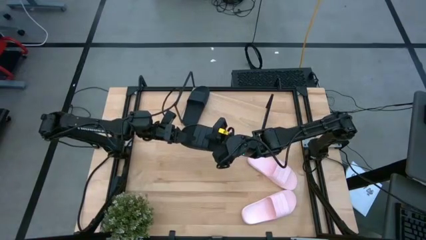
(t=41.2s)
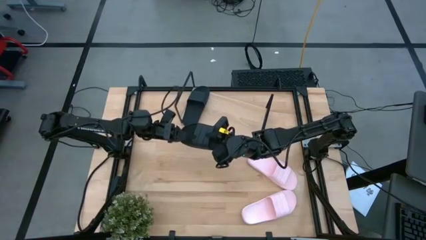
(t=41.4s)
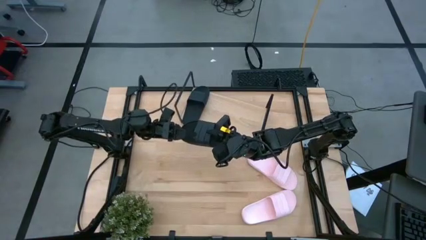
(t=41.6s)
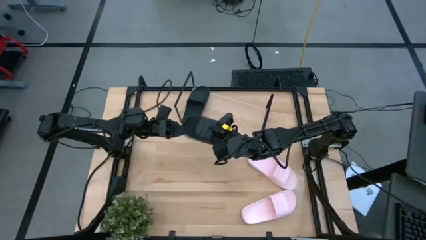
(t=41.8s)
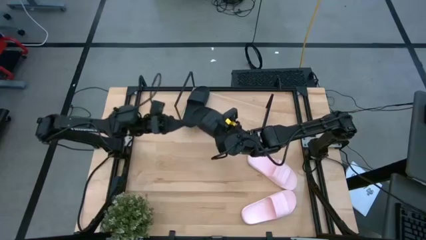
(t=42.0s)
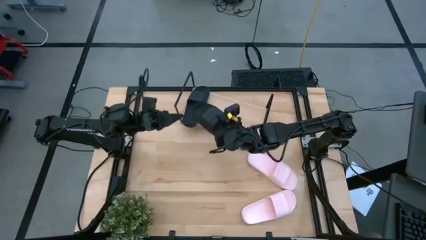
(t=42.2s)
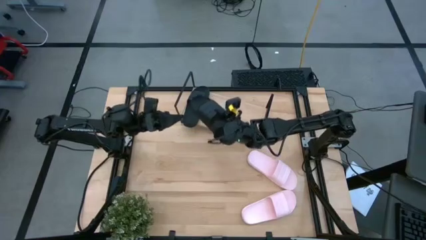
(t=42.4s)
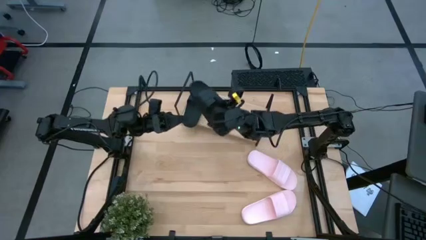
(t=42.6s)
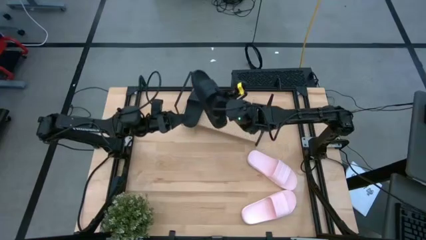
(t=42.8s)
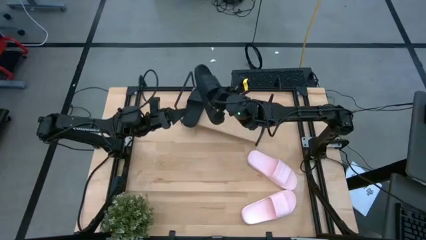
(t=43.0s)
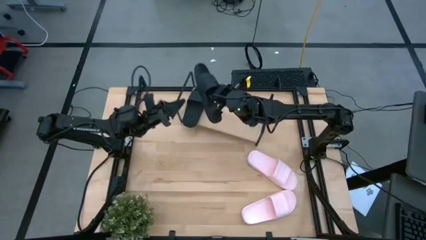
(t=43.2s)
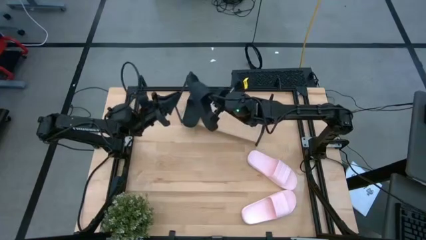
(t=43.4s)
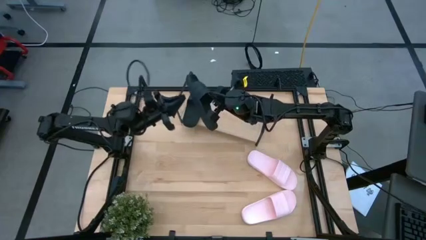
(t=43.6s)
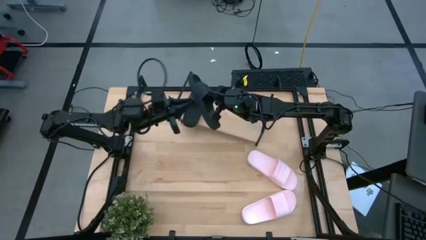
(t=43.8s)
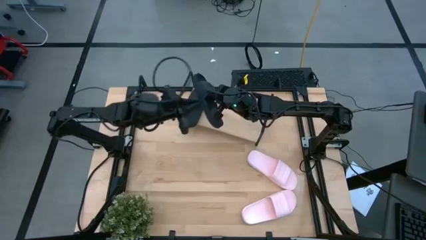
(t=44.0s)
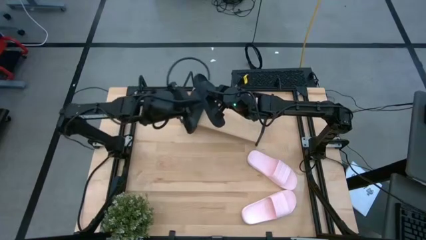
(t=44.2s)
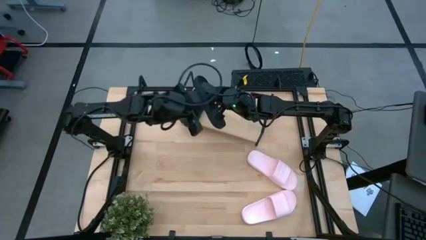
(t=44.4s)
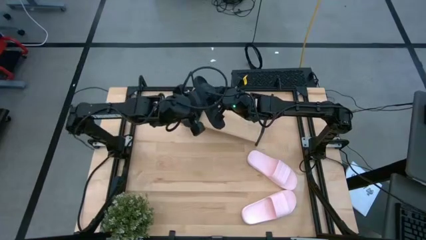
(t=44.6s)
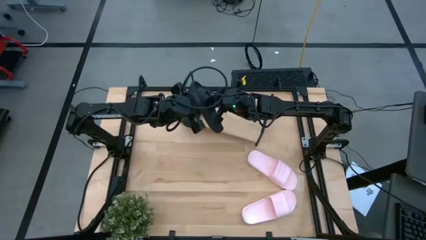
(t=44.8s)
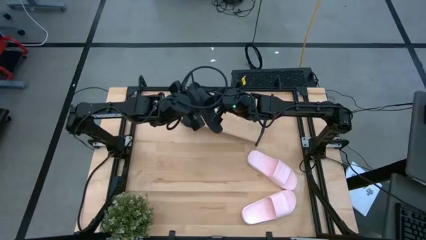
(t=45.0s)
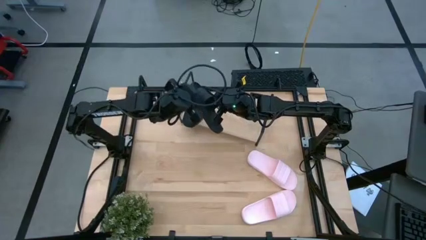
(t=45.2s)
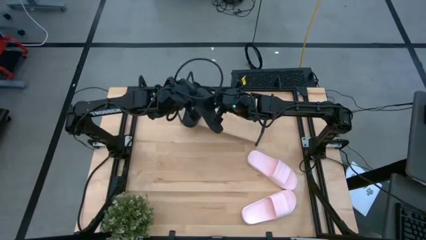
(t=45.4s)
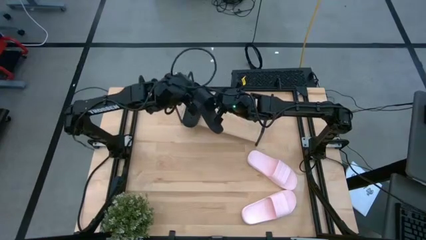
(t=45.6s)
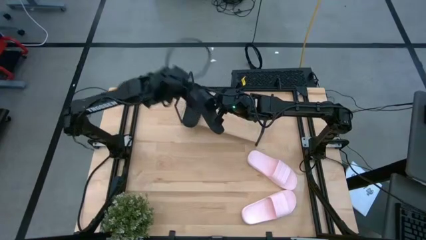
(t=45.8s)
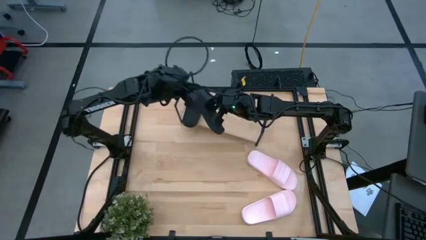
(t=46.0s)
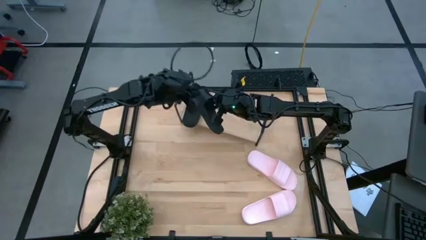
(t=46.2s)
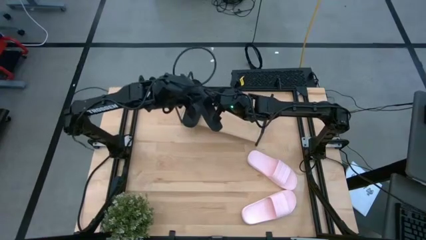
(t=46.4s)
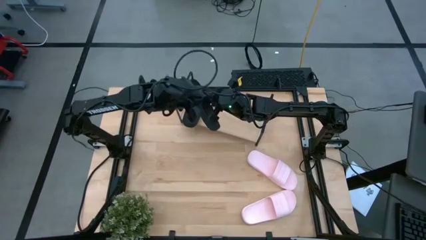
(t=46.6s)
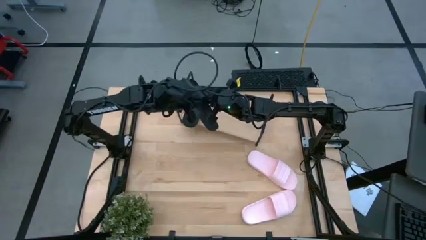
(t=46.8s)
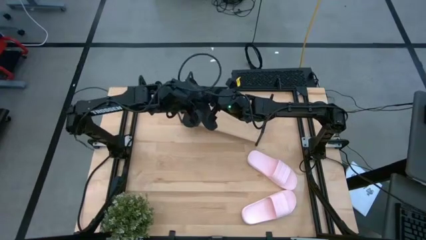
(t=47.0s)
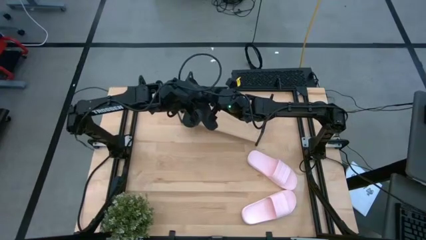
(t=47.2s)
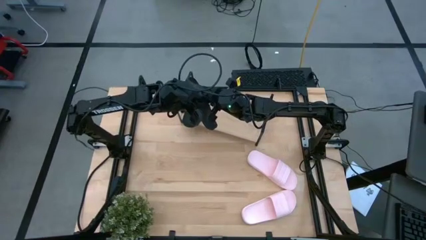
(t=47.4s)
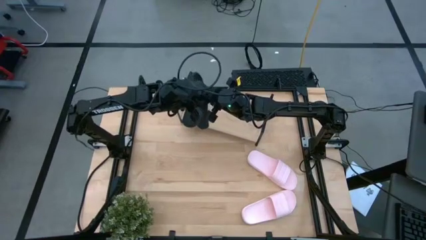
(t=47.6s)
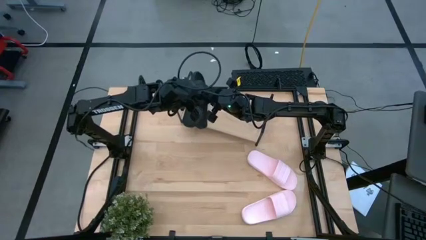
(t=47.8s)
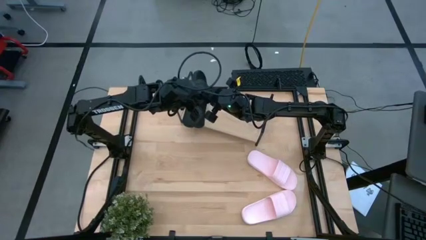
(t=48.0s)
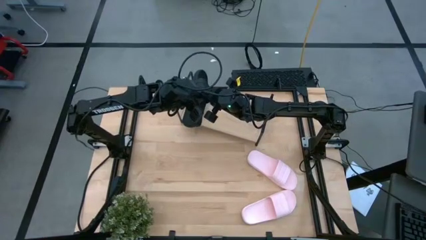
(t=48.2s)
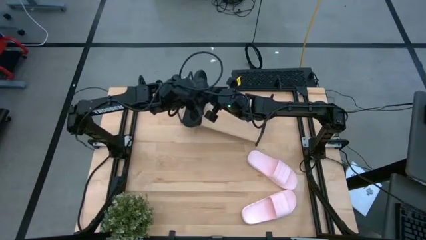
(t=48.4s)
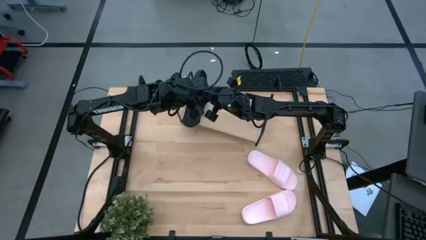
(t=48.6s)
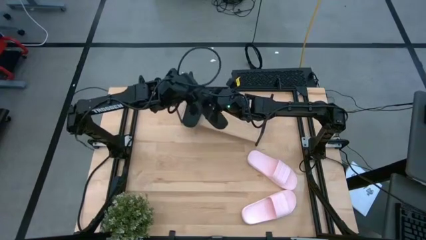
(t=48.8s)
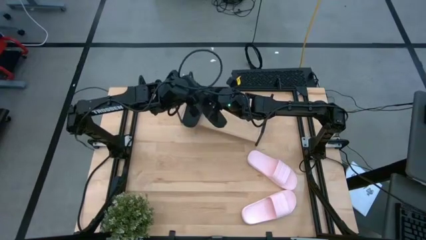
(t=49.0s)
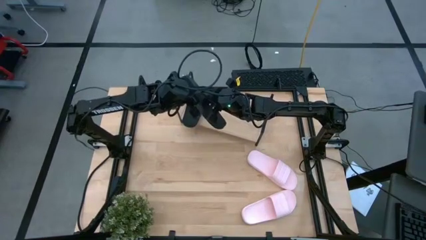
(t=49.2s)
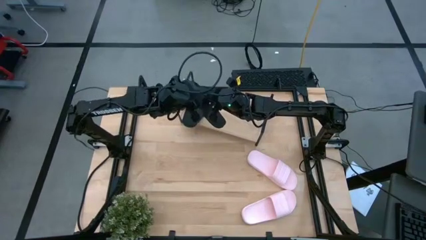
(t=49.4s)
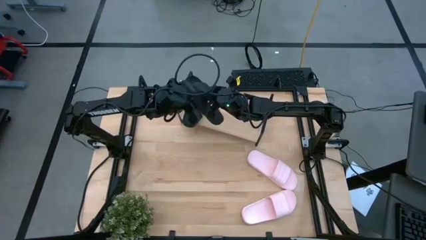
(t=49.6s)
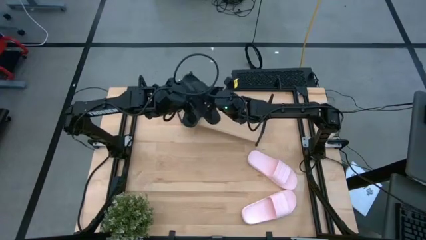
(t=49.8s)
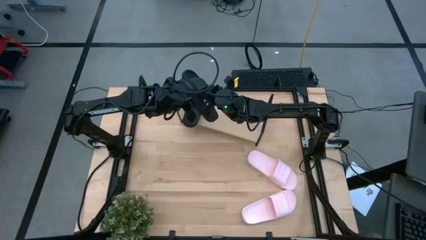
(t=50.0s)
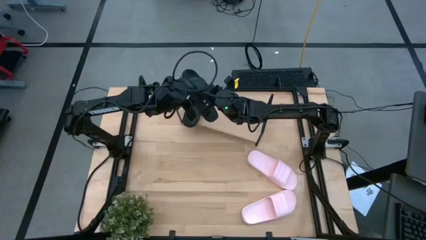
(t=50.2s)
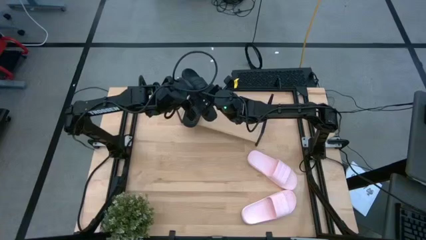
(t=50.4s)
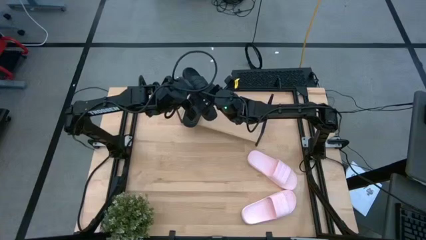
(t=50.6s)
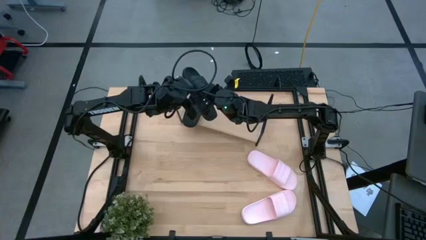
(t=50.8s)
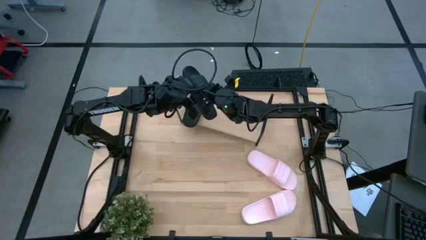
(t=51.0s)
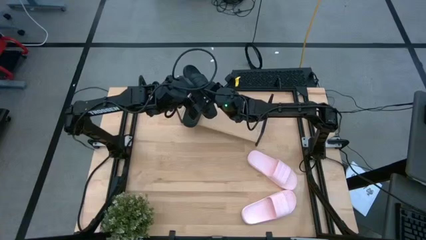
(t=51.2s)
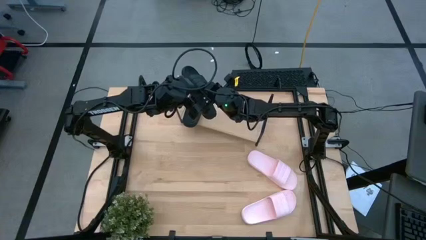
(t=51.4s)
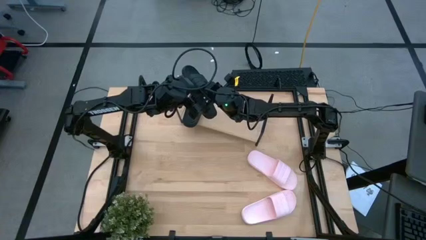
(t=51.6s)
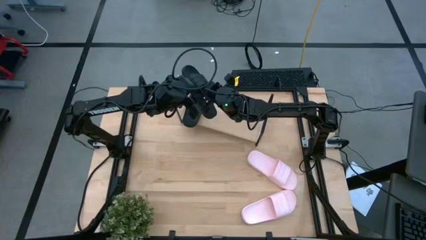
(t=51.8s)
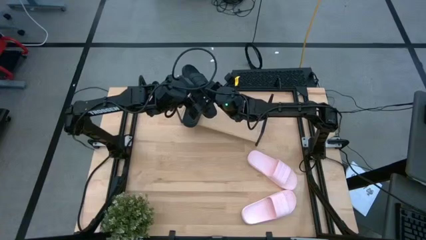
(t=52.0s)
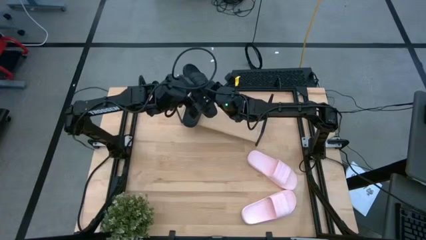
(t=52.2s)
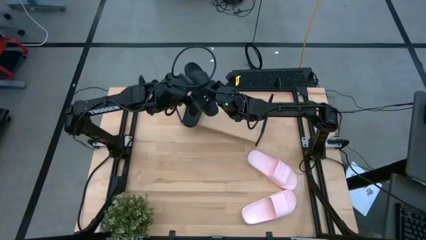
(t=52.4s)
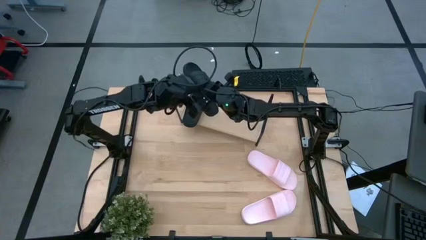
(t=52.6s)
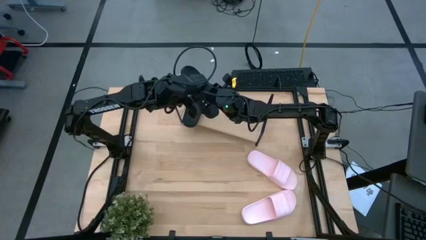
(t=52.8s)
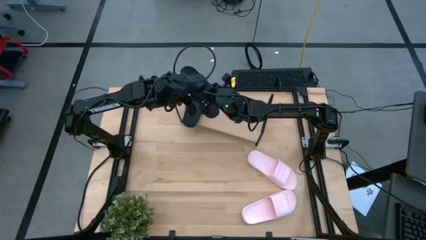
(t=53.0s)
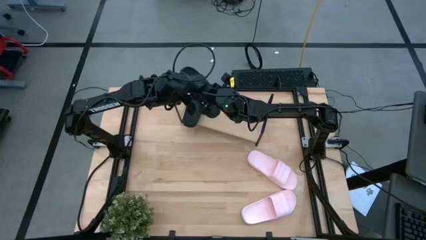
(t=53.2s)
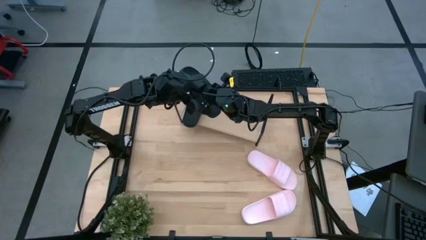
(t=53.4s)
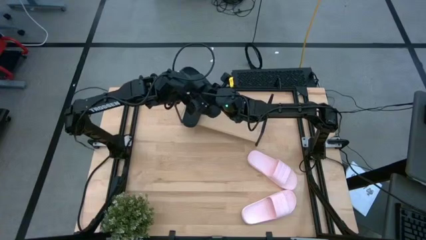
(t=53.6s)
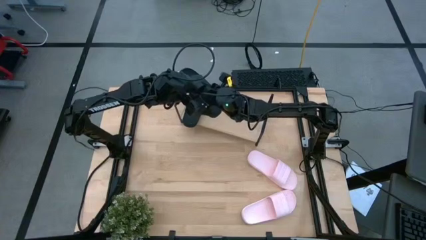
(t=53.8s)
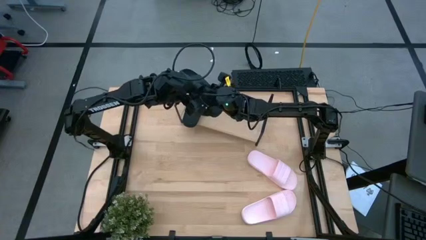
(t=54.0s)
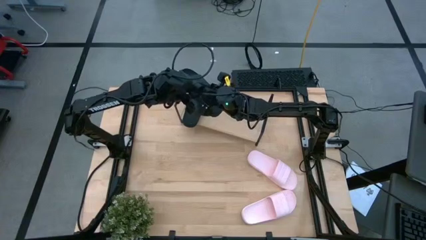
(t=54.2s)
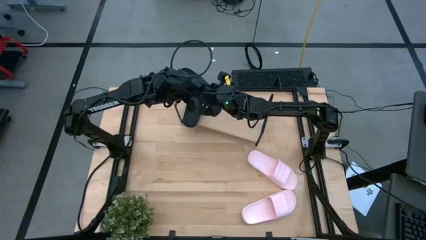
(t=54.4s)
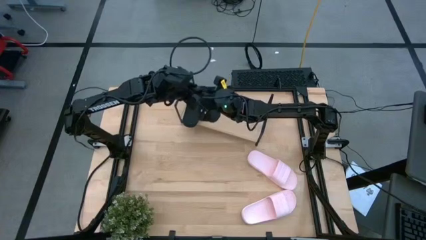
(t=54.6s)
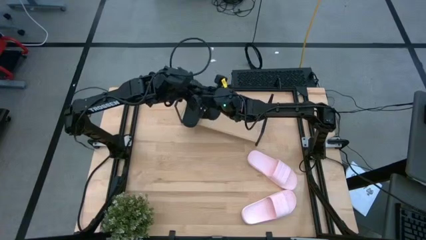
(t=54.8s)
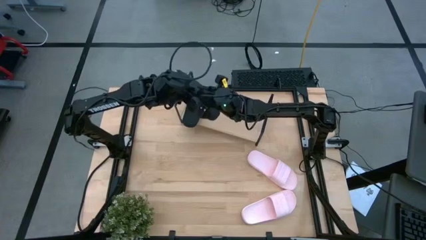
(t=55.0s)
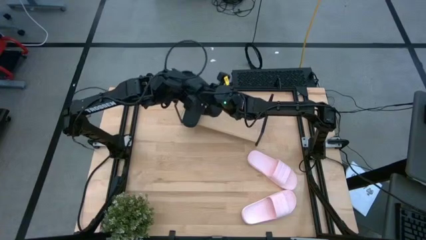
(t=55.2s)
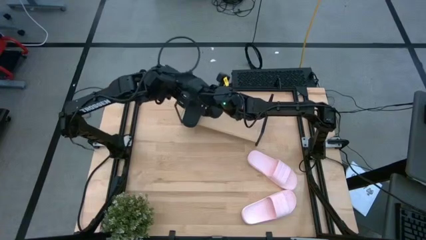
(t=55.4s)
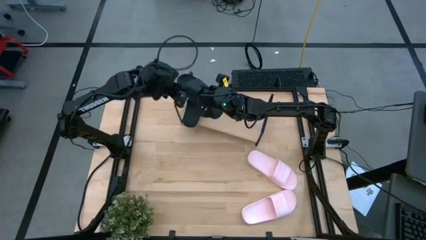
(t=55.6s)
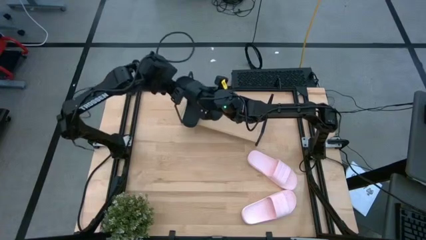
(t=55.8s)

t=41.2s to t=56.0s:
Task: Pick and place slides into the shelf
Put the black slipper on the shelf

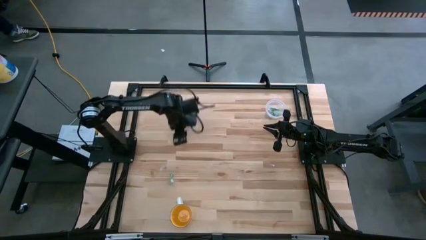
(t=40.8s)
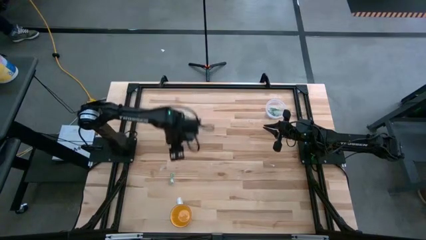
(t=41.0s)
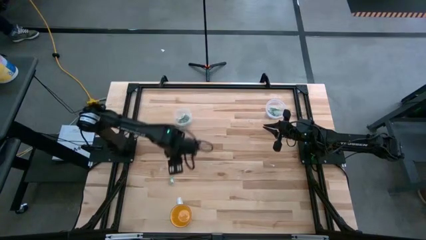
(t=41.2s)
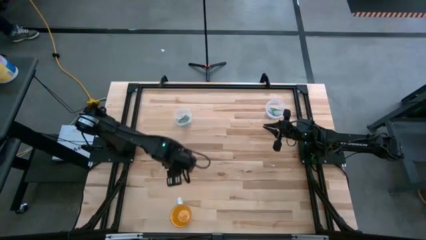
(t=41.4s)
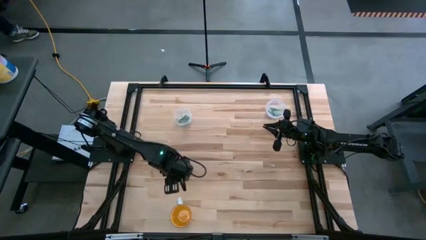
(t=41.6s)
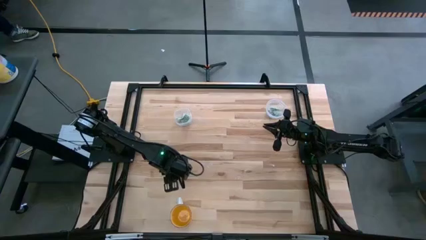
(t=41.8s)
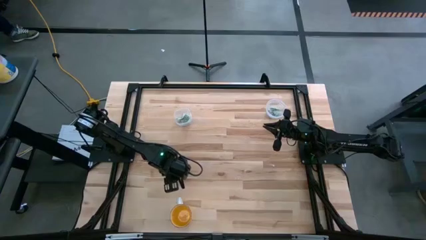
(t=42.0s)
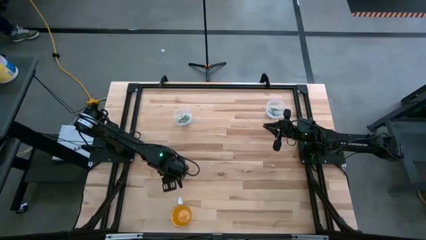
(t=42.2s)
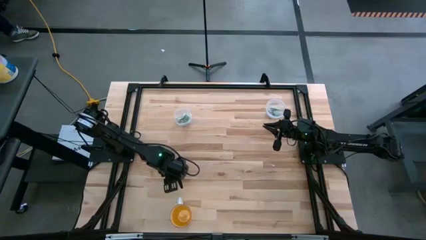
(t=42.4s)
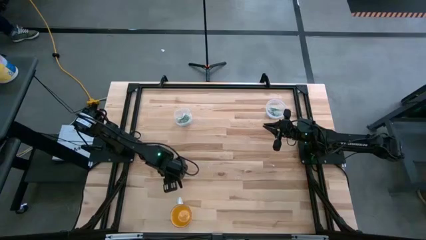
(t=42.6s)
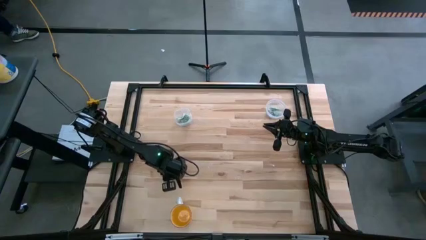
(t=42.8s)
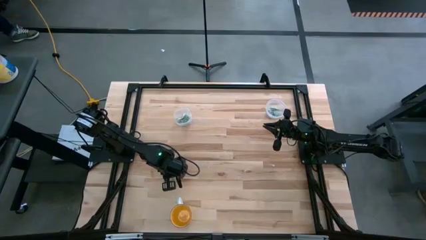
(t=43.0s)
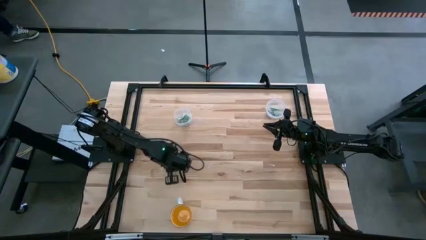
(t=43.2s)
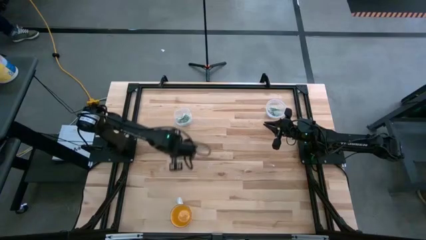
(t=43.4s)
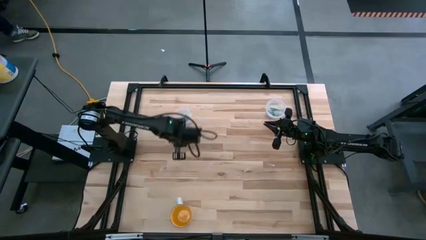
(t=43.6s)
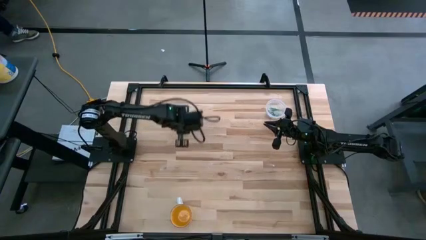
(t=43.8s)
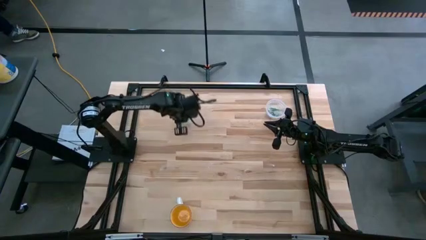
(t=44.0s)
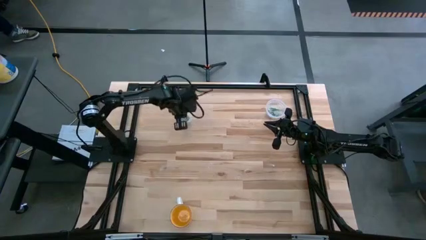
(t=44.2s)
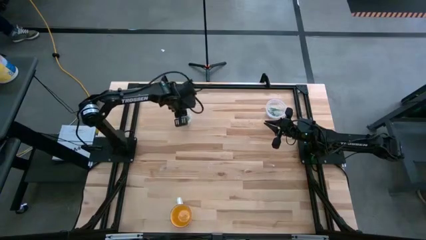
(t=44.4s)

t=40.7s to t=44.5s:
Task: Pick and place items into bin
Put the stevia packet into the left transparent bin
